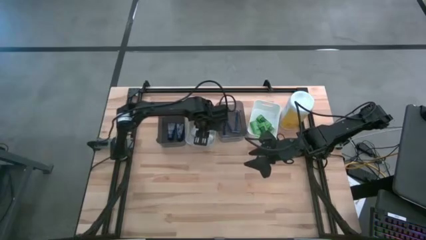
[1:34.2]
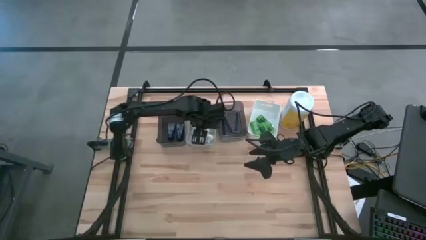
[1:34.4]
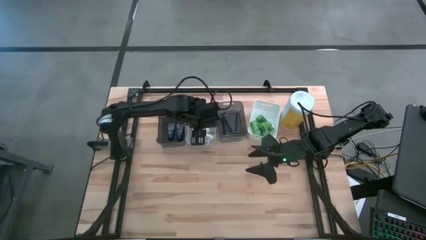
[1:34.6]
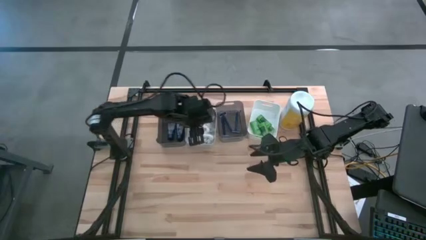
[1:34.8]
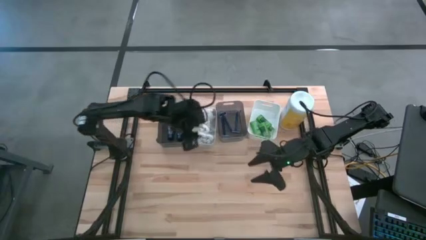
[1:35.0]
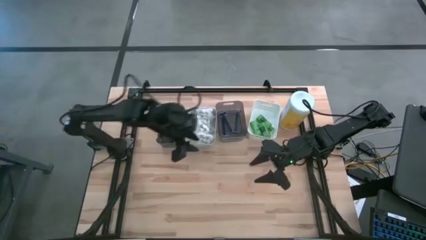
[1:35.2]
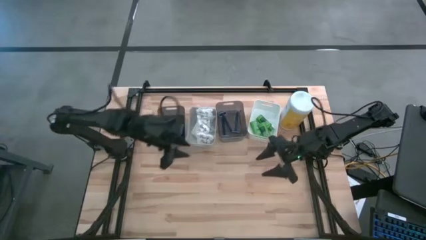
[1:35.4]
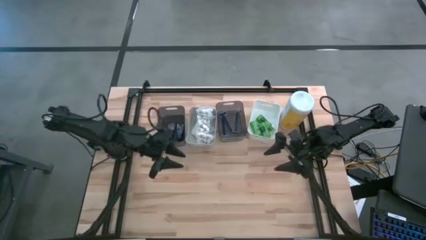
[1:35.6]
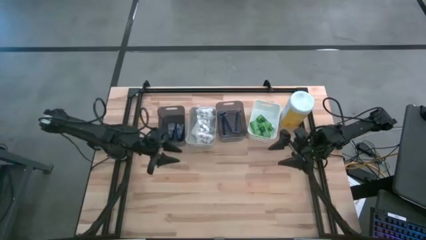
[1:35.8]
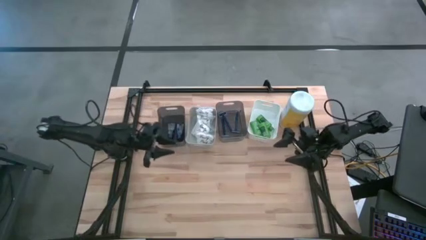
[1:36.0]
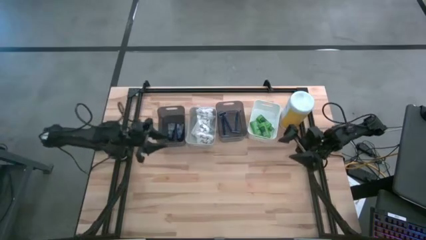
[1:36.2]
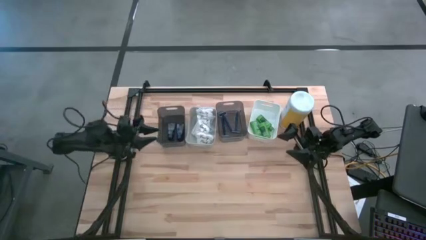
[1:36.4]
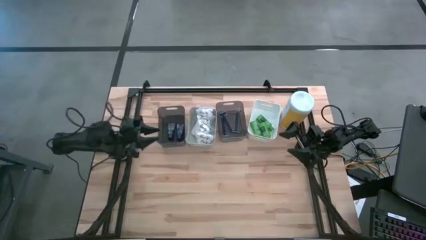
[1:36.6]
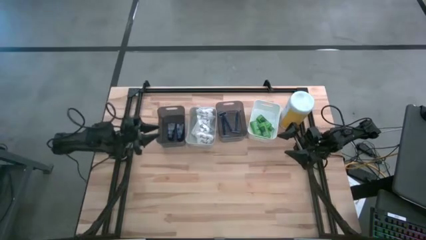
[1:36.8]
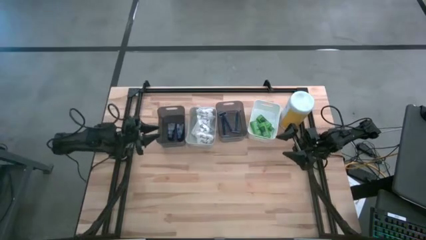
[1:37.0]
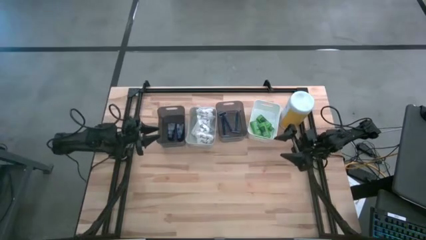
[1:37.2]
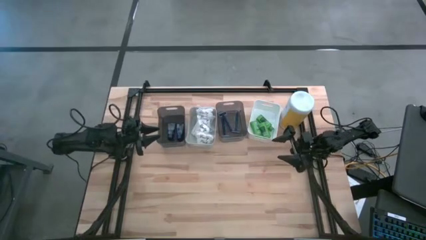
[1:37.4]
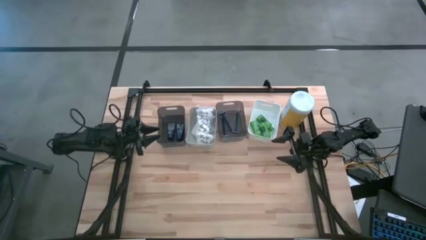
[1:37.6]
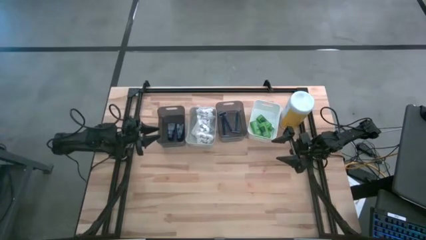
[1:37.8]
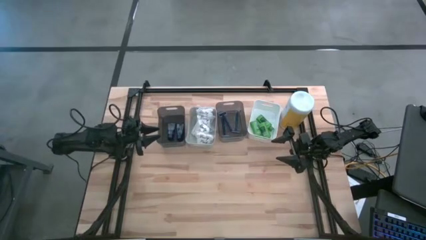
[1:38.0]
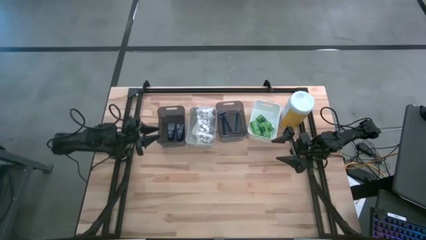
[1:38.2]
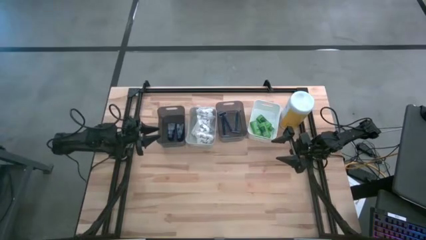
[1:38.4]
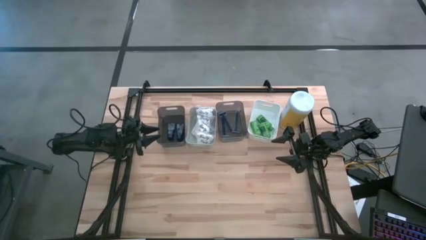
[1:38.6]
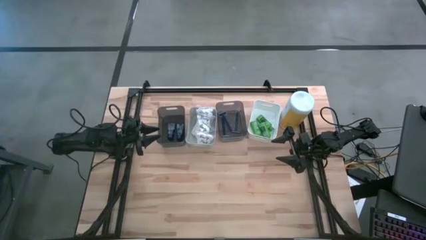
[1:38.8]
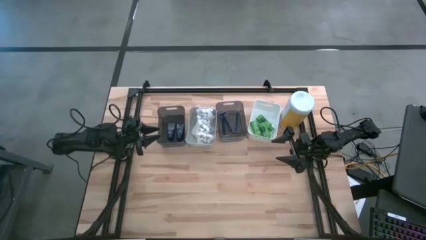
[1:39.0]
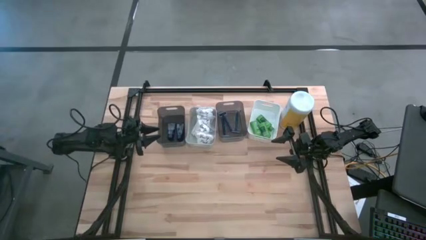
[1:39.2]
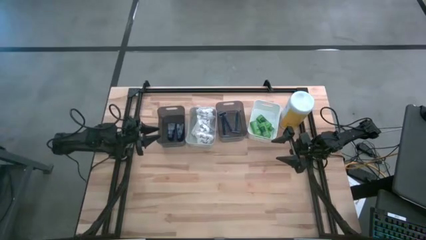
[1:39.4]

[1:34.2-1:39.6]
Task: Pick & Place Travel size toiletries
Return to Home Position

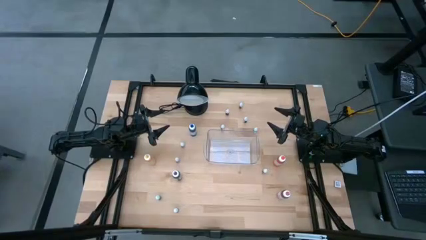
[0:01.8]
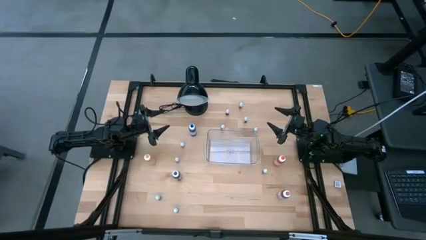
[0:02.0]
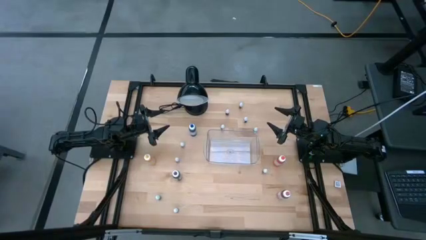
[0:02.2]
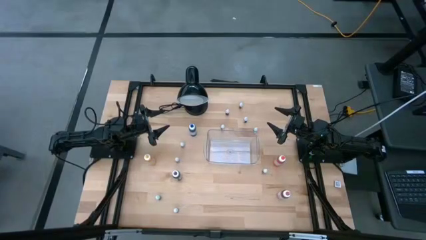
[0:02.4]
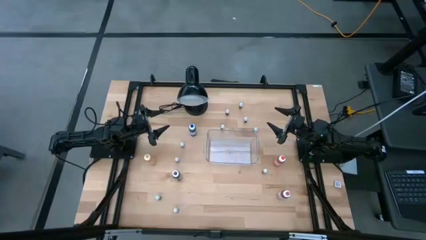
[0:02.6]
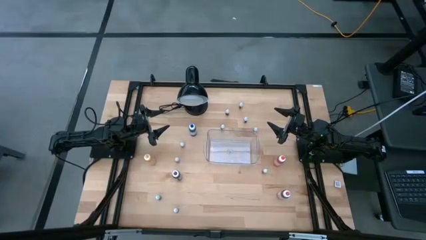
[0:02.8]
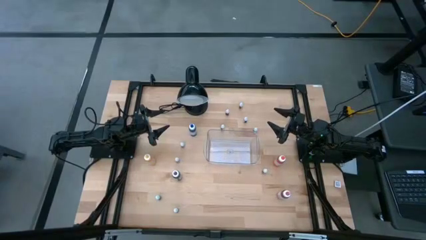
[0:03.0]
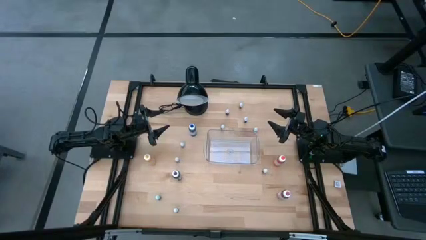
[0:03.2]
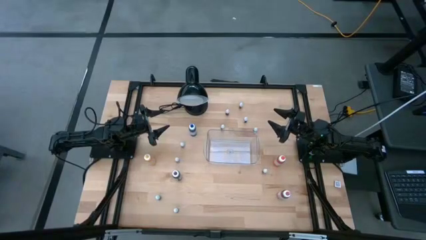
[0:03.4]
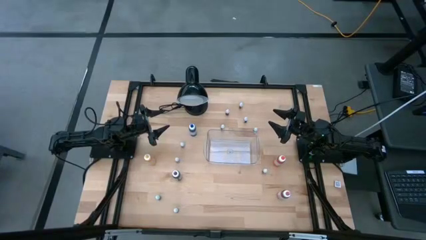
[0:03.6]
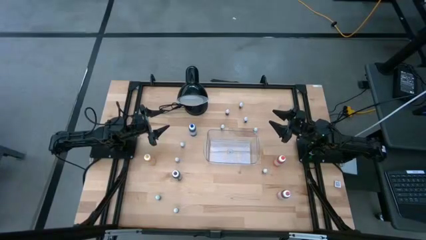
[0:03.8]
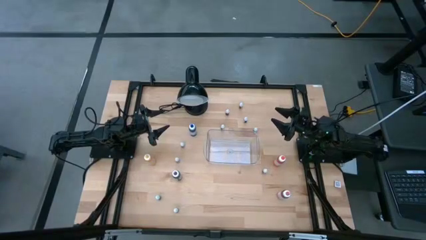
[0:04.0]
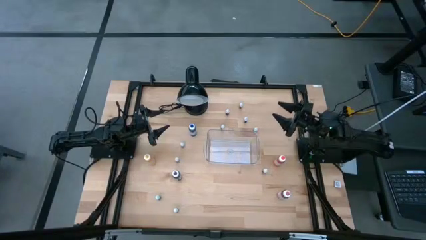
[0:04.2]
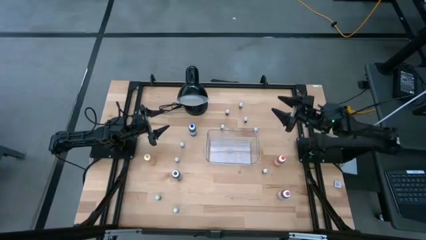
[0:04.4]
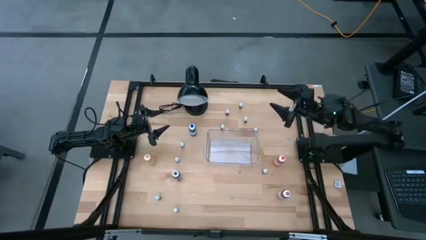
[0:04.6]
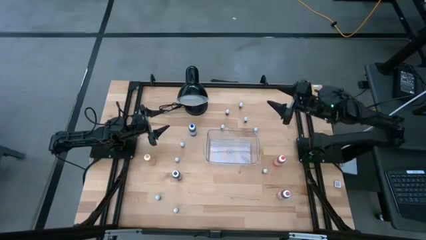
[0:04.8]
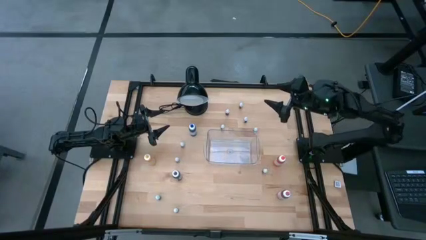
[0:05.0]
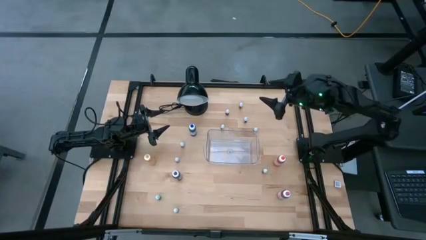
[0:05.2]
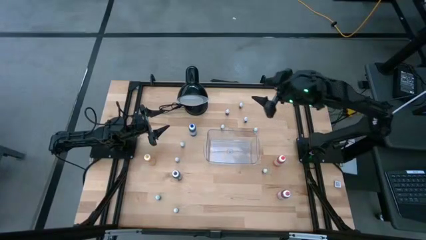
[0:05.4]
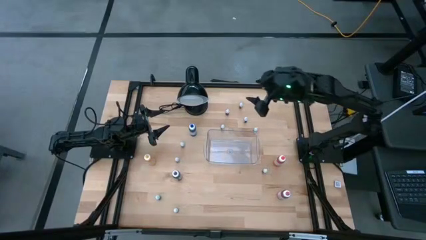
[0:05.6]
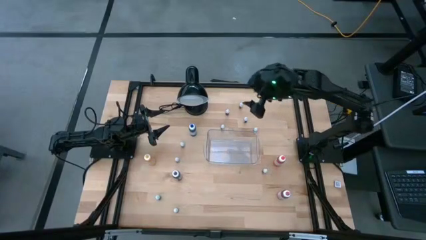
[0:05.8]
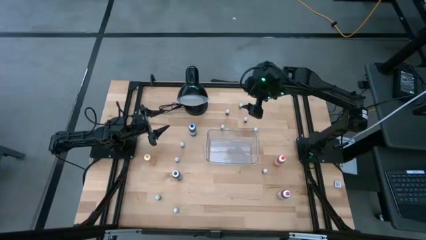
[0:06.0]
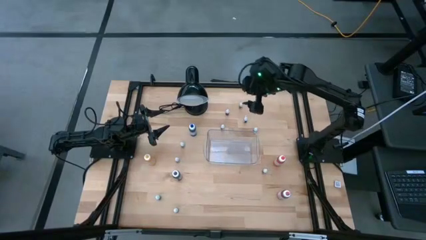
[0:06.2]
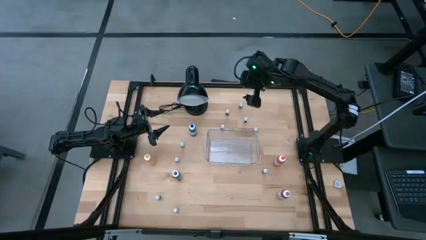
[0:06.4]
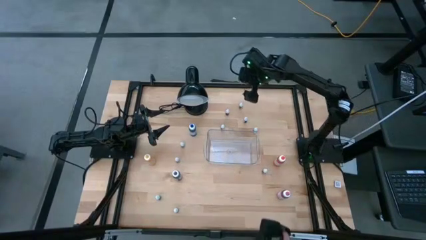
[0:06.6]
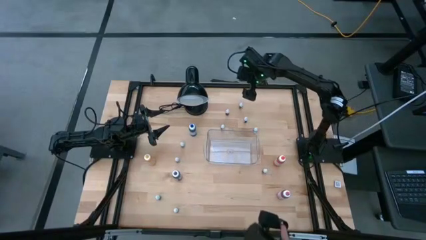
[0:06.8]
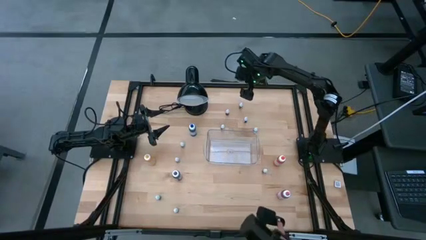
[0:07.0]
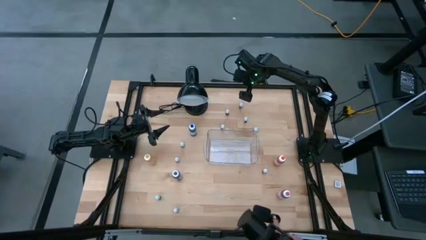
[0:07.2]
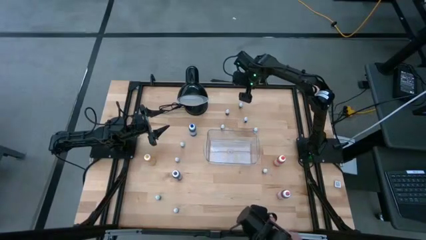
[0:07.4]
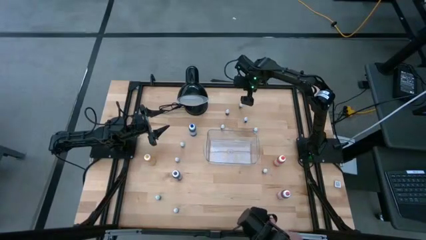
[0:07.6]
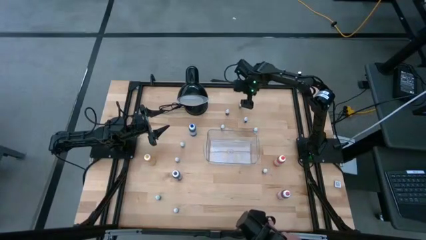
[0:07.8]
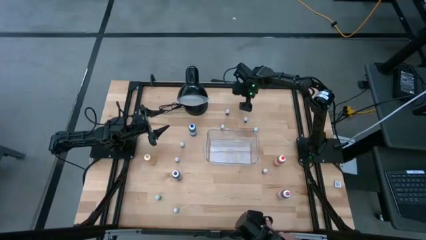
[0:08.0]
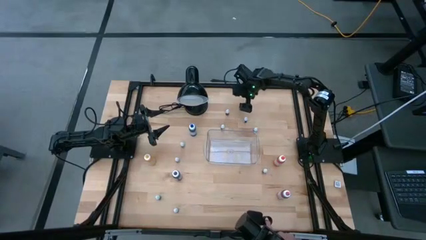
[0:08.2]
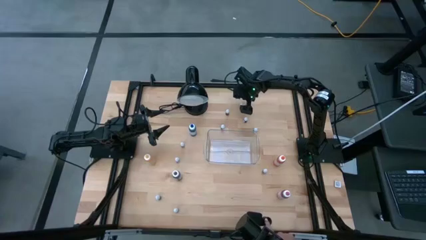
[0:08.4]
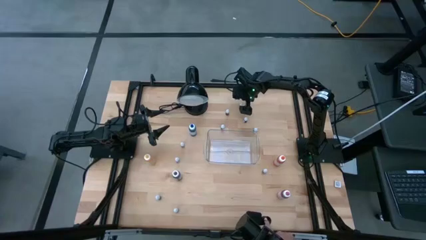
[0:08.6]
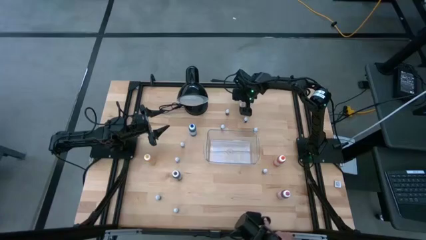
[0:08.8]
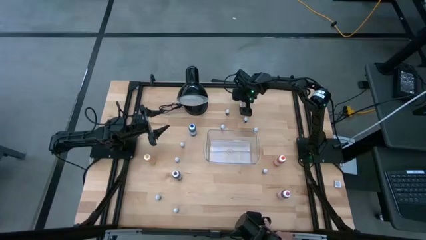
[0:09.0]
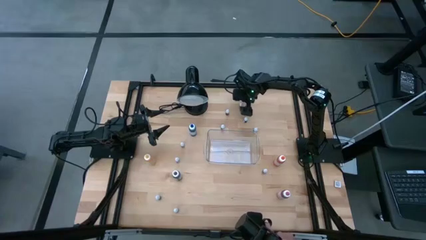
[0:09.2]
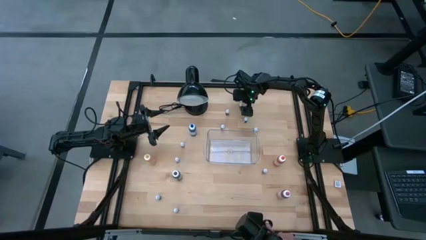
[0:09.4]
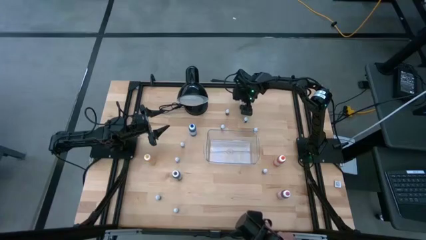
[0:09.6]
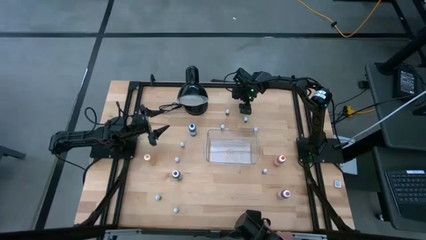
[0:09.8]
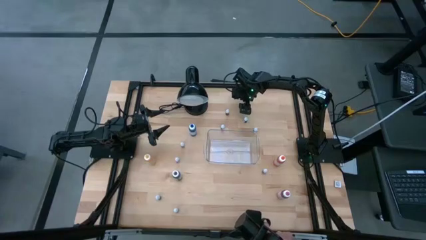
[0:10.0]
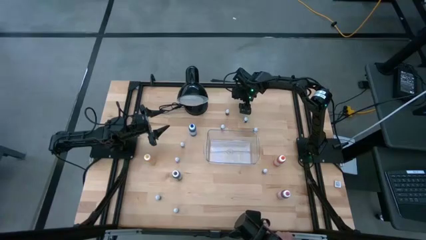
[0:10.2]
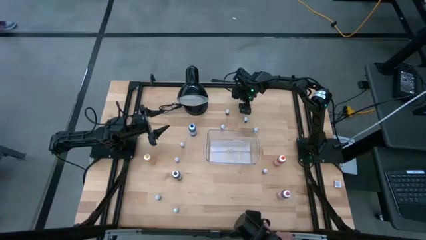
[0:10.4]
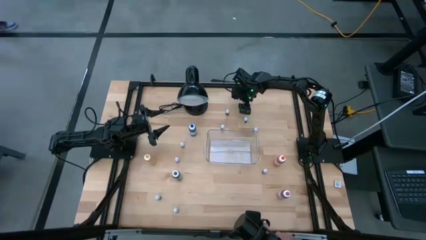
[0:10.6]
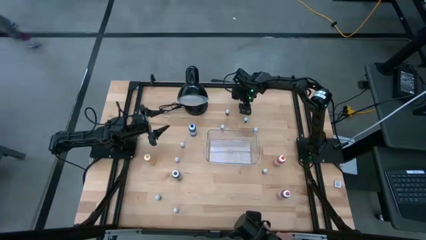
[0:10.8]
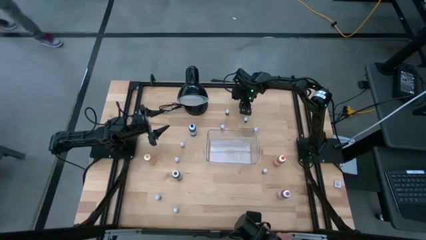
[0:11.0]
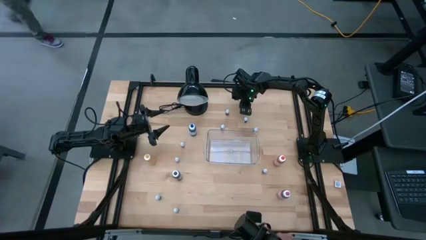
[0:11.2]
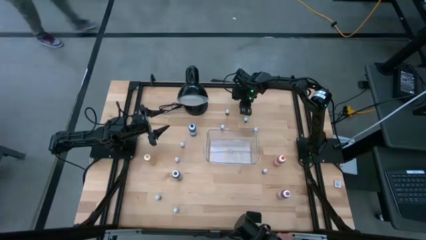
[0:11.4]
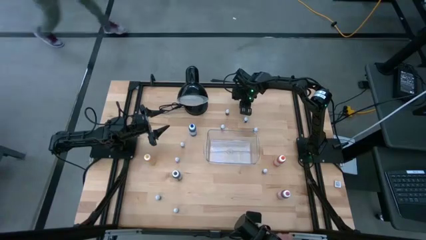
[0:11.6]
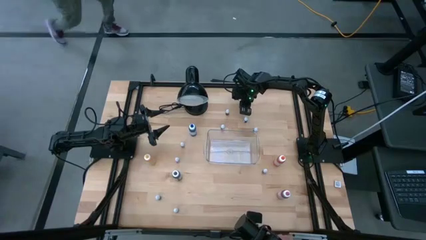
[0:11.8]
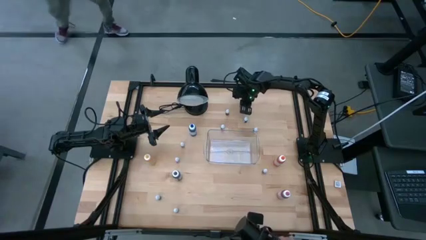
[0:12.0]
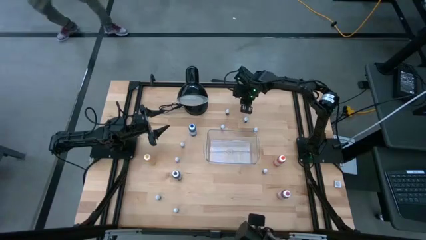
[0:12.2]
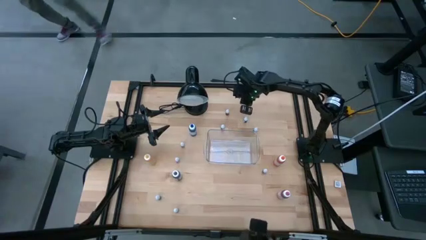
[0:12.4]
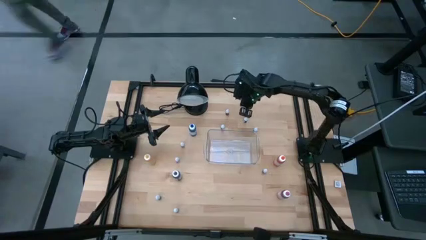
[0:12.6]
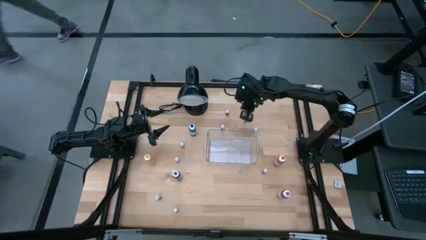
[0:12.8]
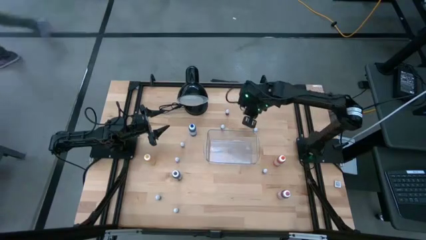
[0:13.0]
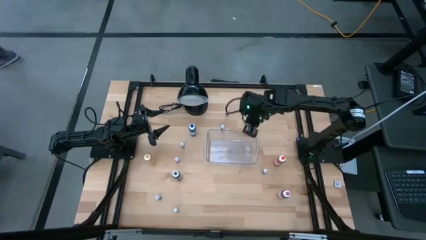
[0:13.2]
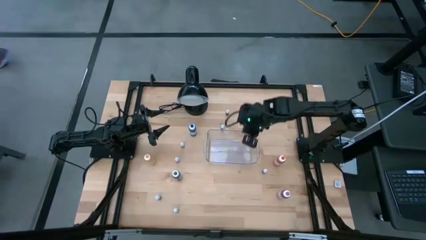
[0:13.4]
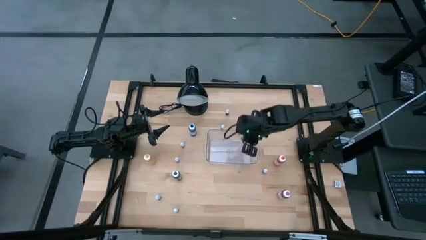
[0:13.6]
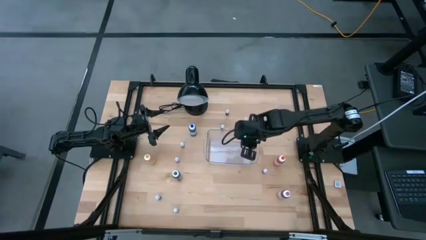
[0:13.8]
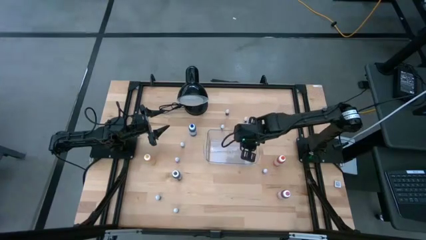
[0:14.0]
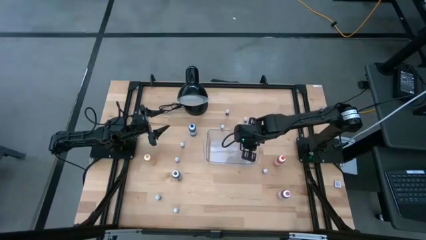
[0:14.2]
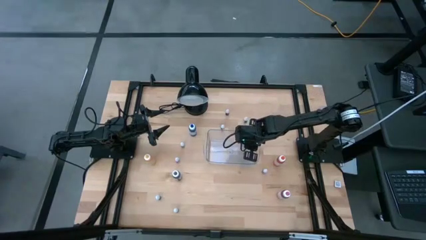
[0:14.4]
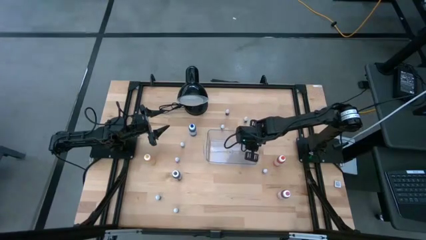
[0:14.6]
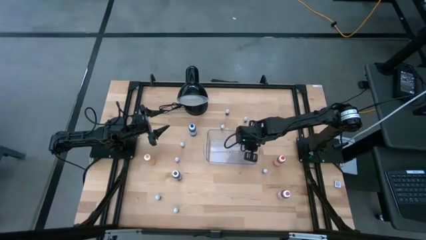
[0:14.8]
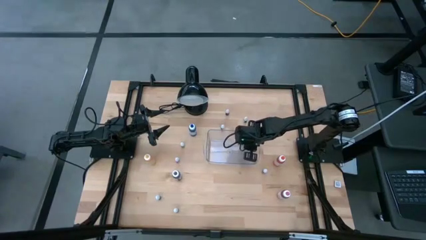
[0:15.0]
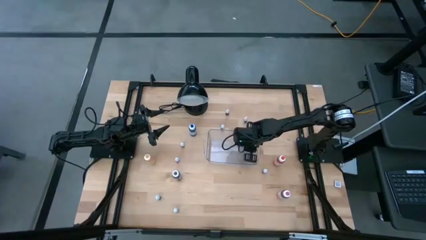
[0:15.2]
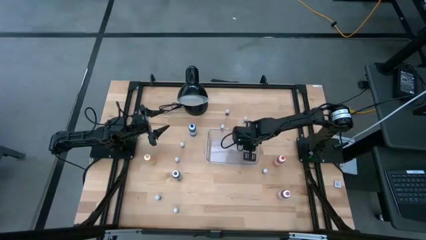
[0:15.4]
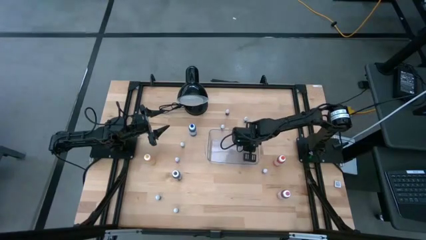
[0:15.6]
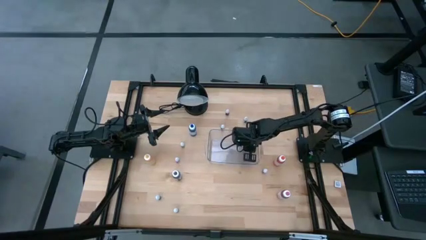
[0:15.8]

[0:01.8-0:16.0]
Task: Pick & Place food coloring
Put the small green food coloring bottle into the transparent bin
